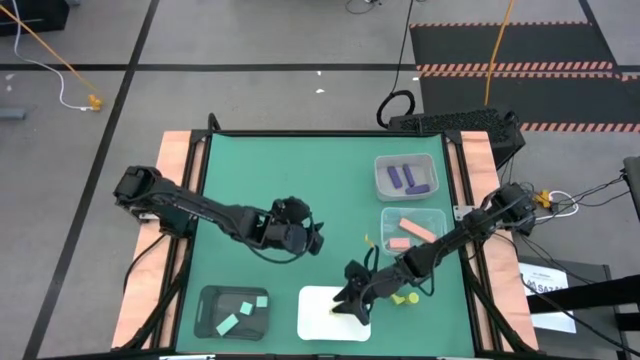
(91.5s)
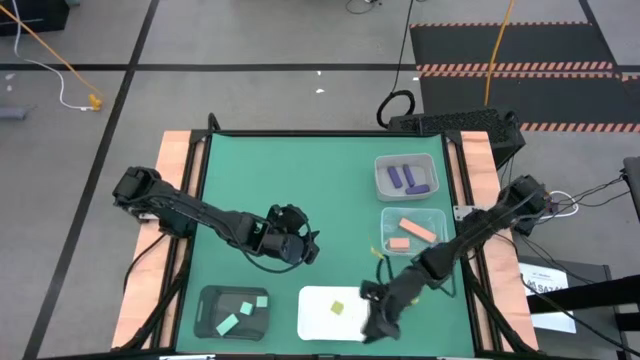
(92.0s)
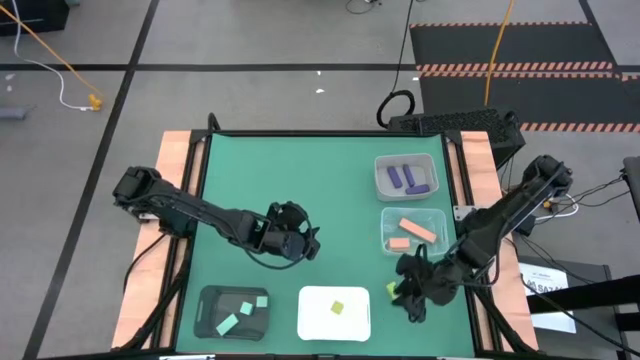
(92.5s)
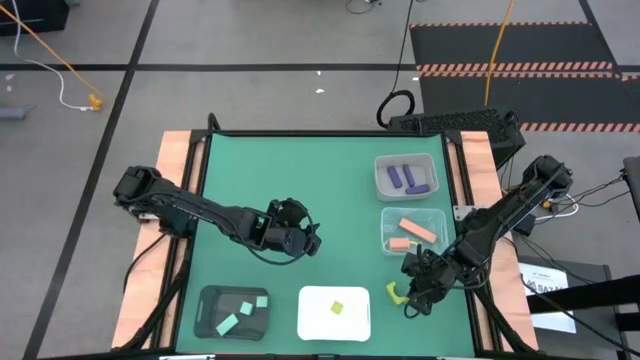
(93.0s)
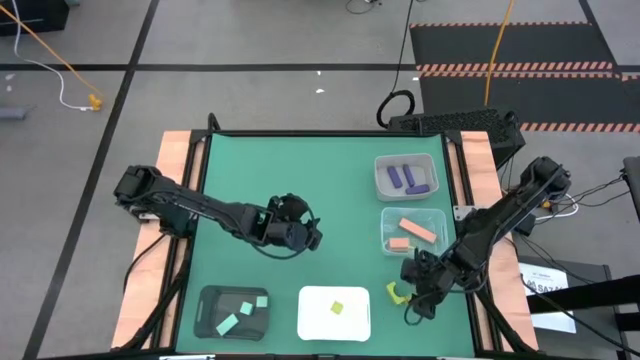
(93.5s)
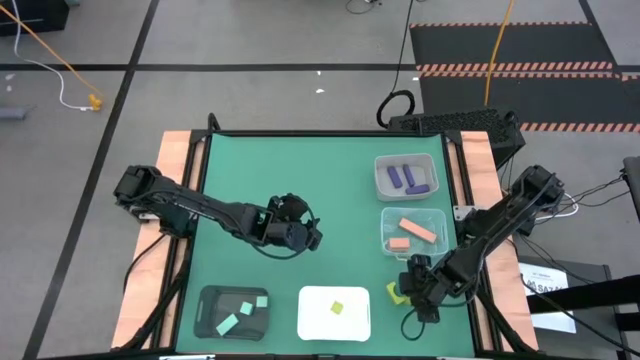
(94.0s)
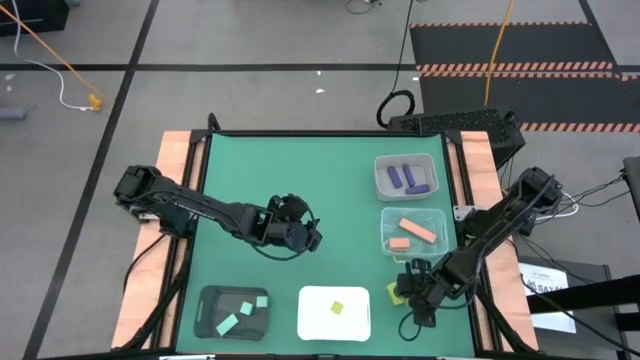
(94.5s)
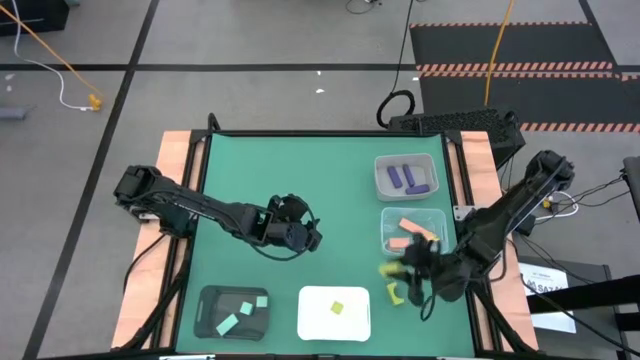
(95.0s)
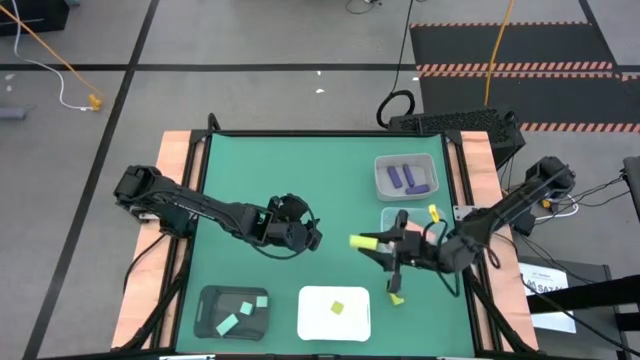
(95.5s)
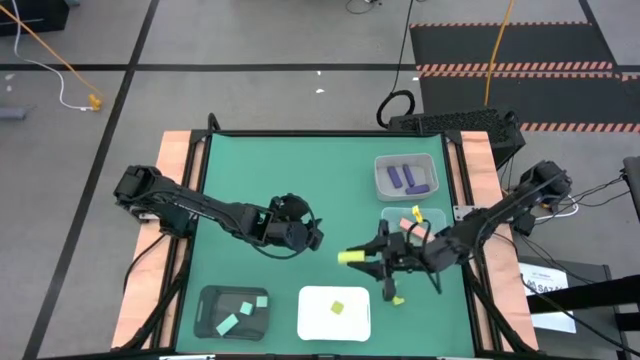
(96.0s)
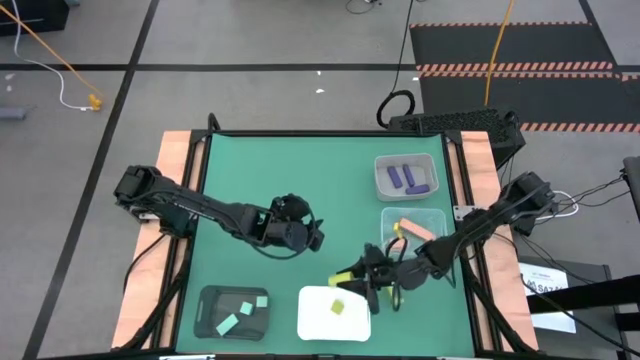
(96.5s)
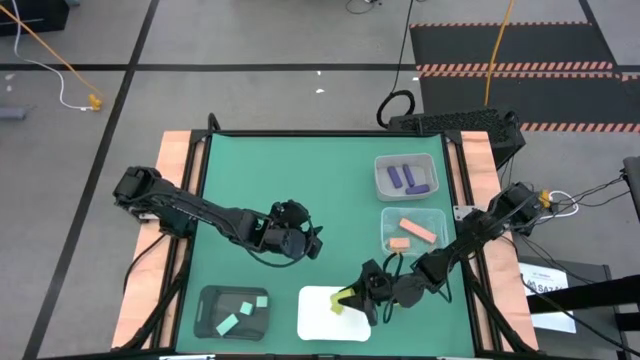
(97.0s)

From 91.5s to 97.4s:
Task: Sort & place blocks by color
Put the right green block into the white bin

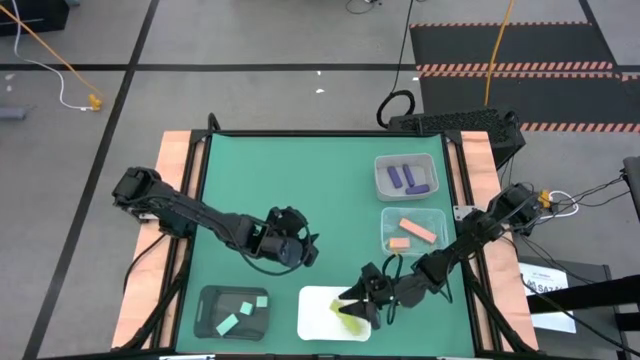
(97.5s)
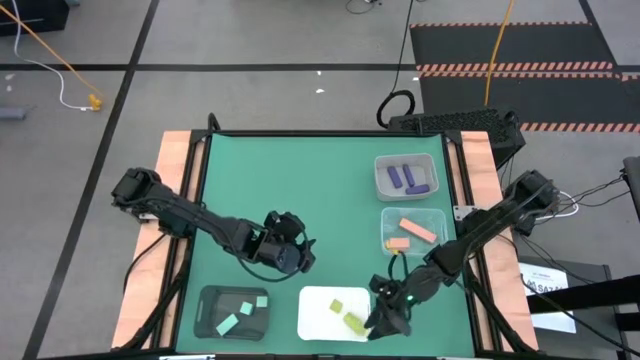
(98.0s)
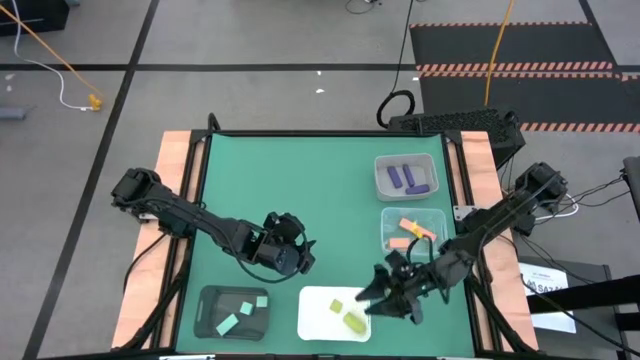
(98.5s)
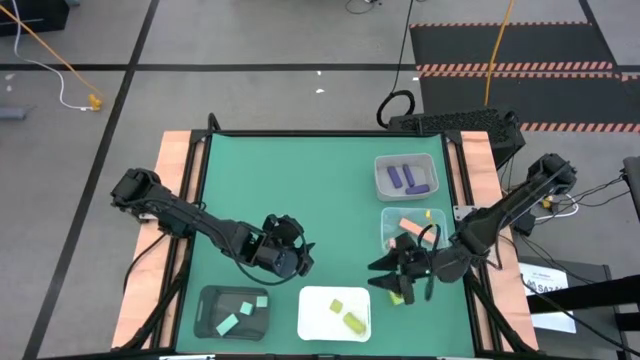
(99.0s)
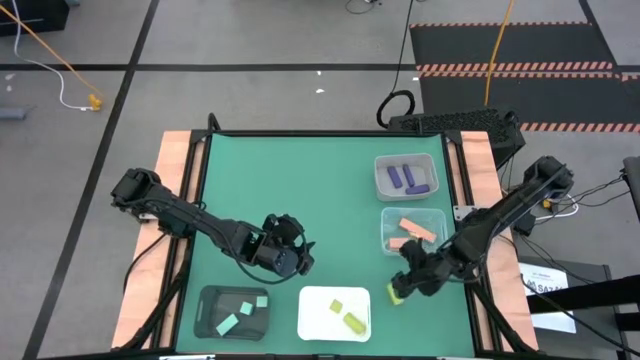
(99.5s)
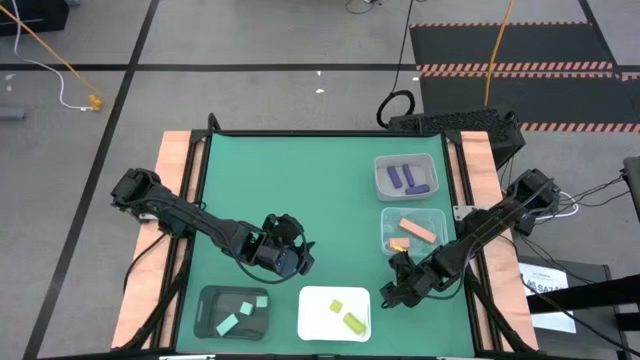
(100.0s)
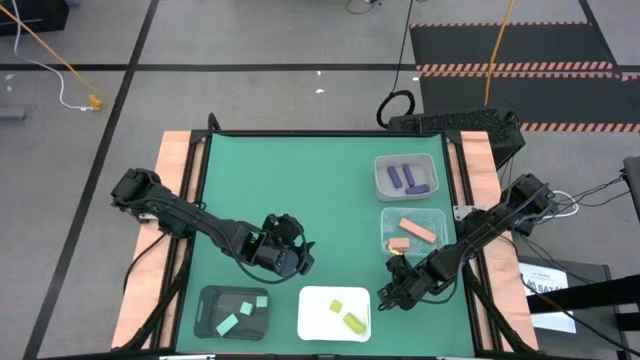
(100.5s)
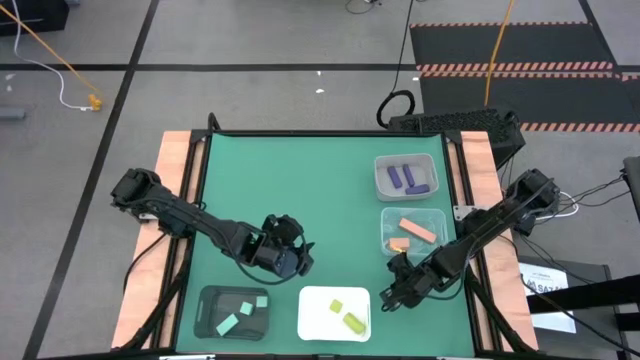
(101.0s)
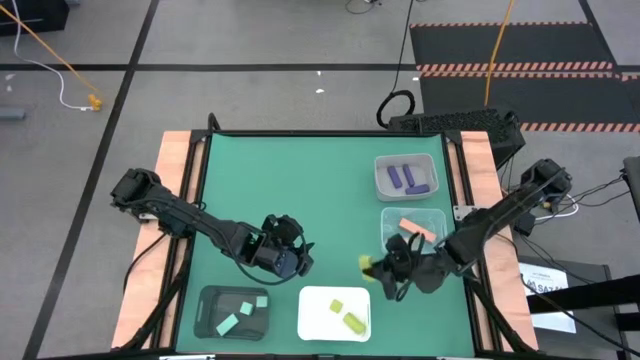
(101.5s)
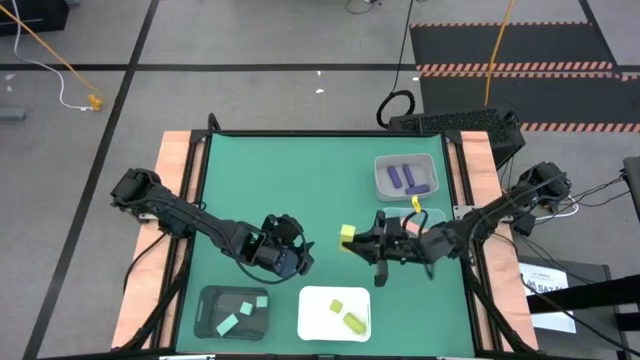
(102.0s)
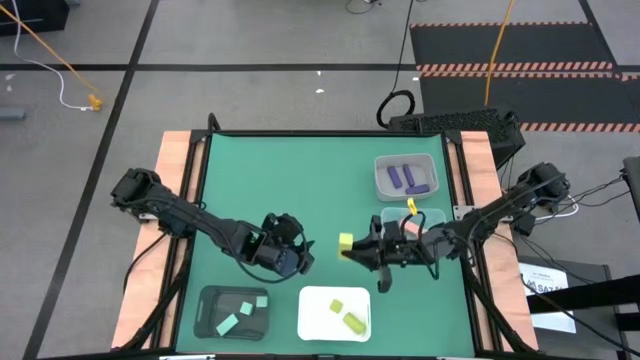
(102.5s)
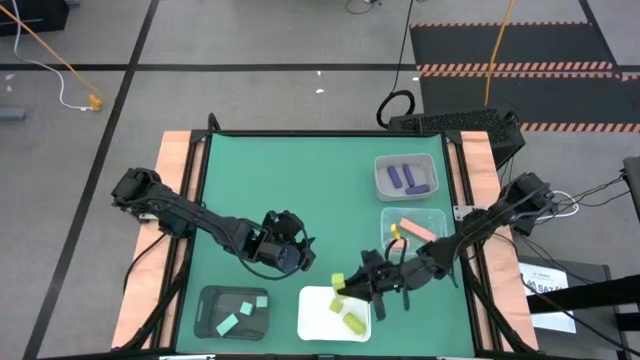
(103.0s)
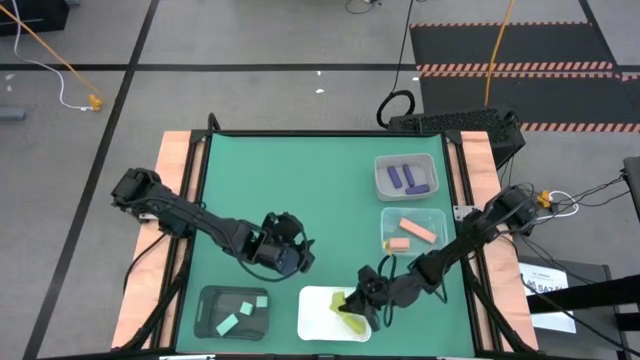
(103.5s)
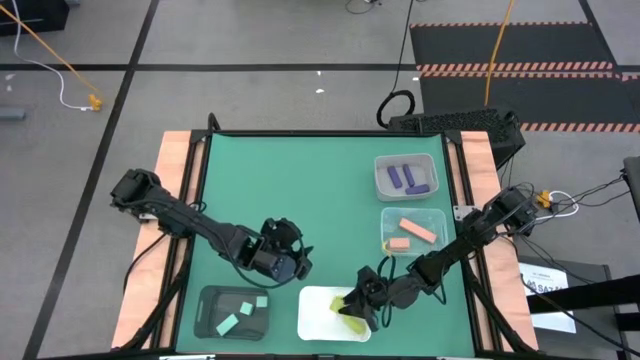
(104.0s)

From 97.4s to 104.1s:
Put the green block into the white bin

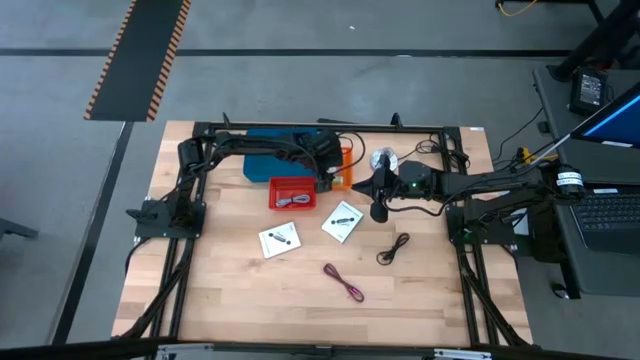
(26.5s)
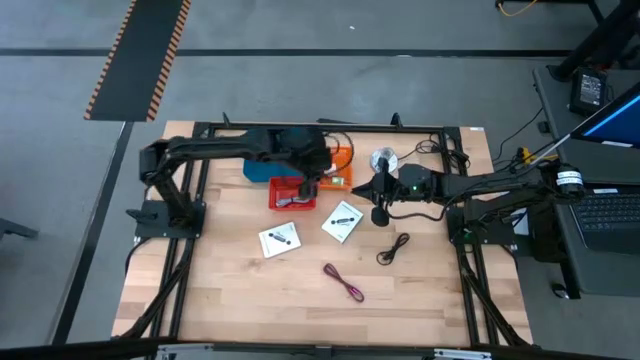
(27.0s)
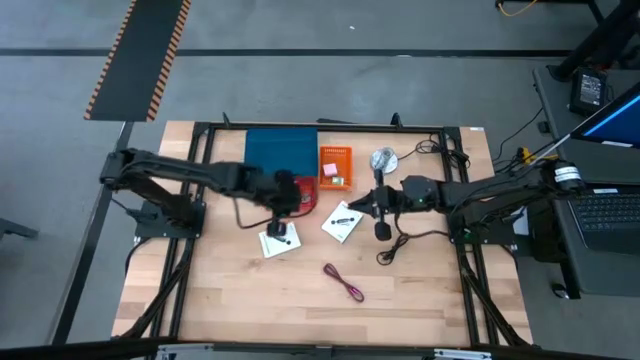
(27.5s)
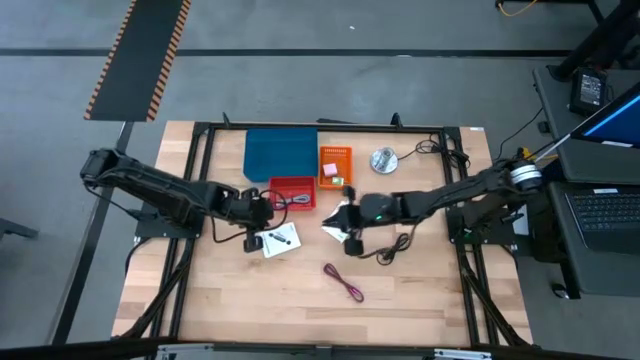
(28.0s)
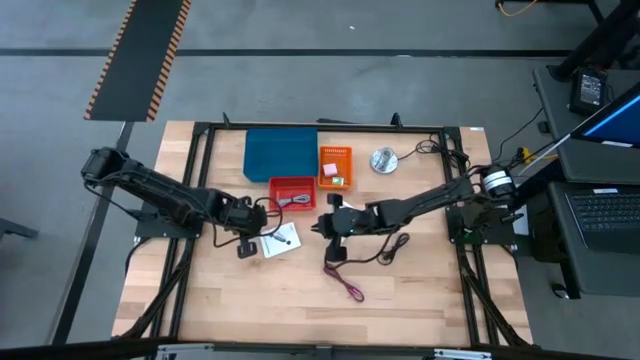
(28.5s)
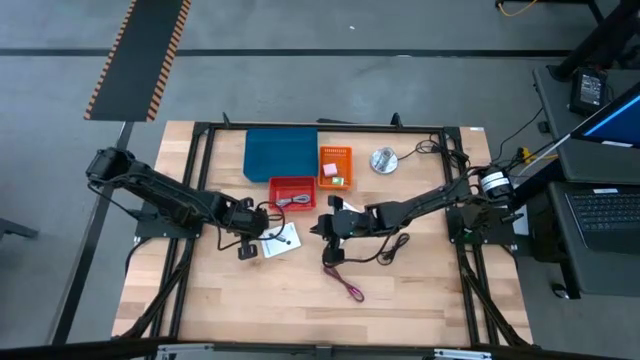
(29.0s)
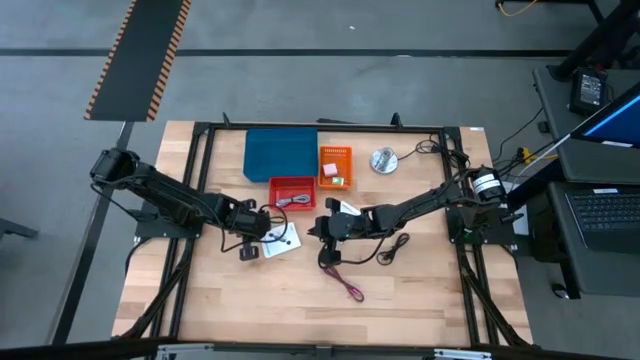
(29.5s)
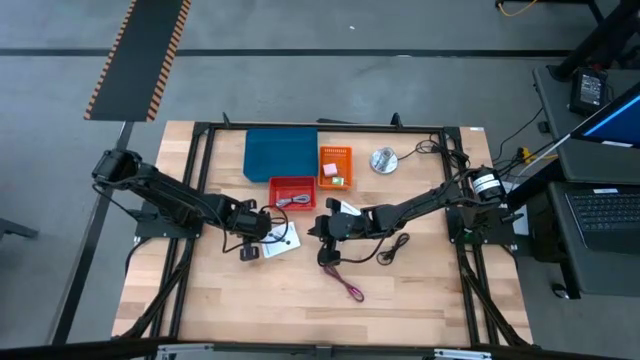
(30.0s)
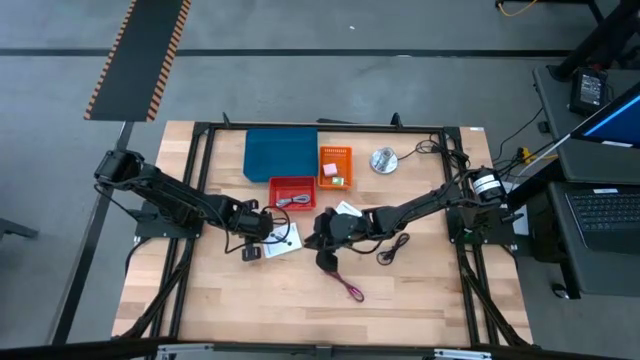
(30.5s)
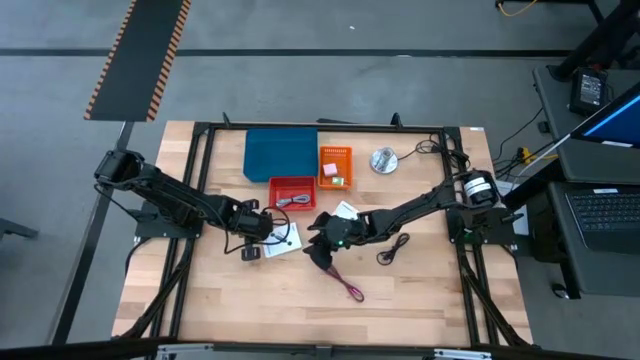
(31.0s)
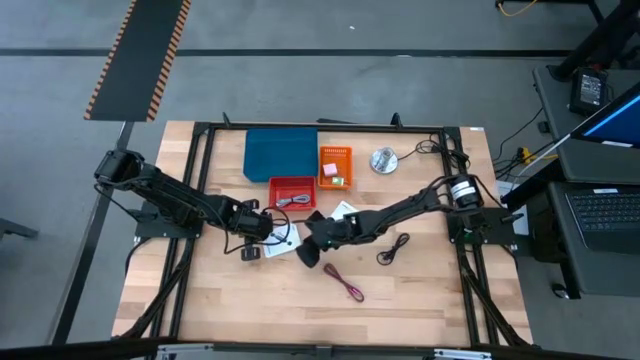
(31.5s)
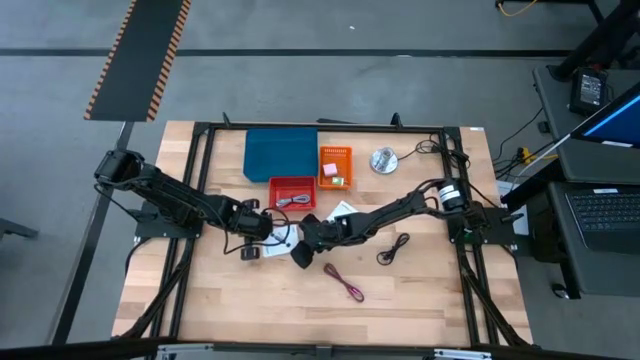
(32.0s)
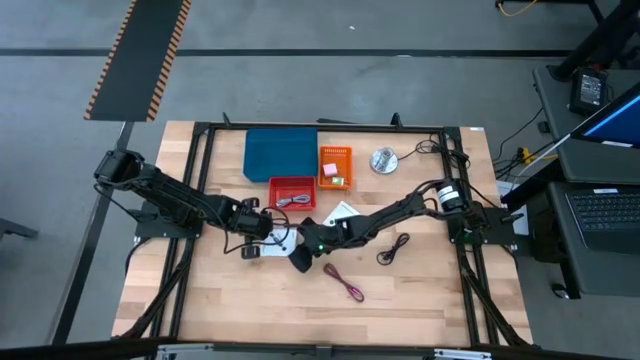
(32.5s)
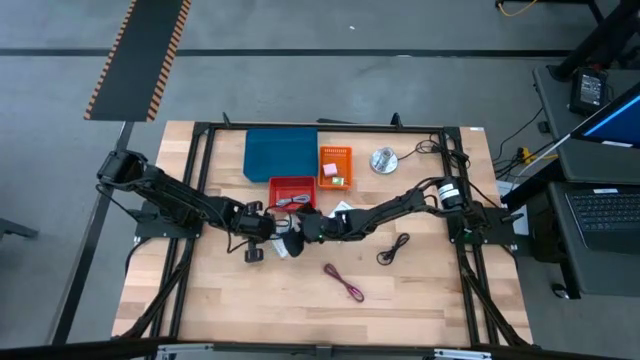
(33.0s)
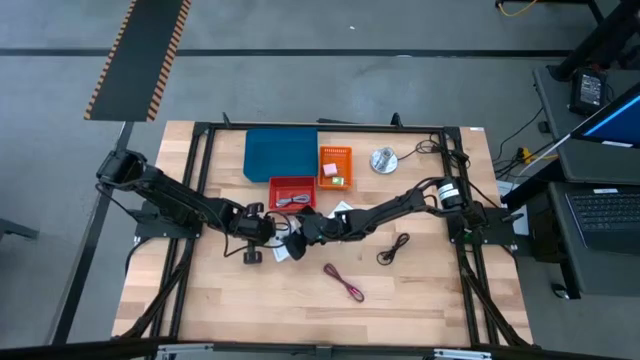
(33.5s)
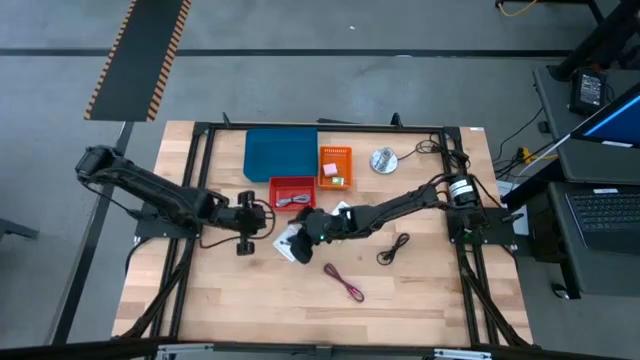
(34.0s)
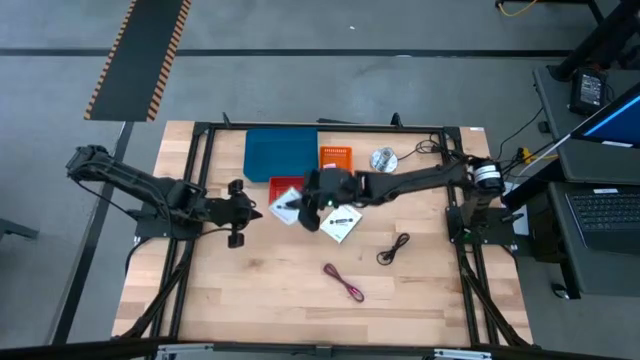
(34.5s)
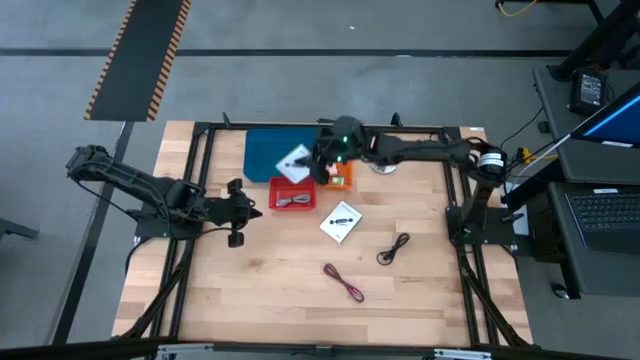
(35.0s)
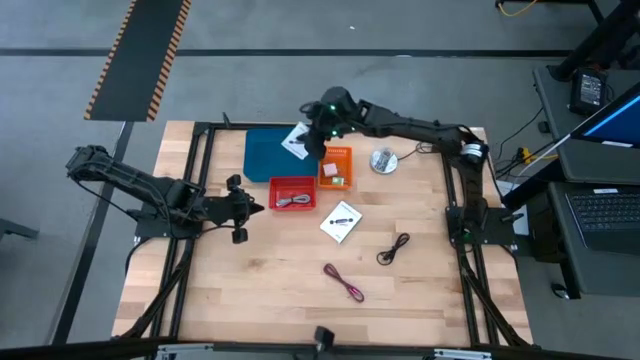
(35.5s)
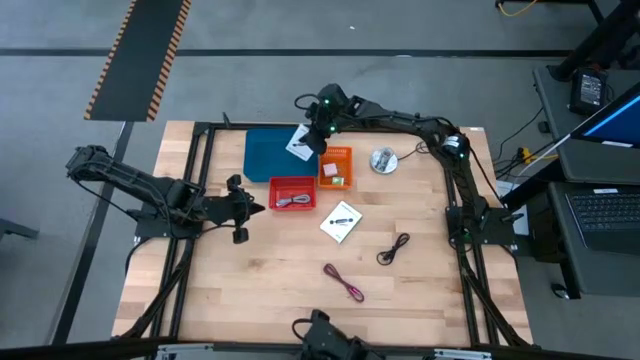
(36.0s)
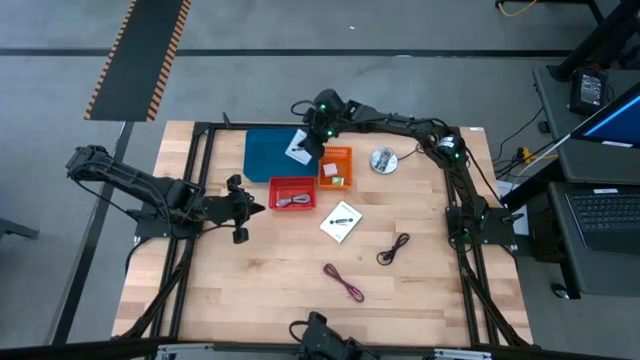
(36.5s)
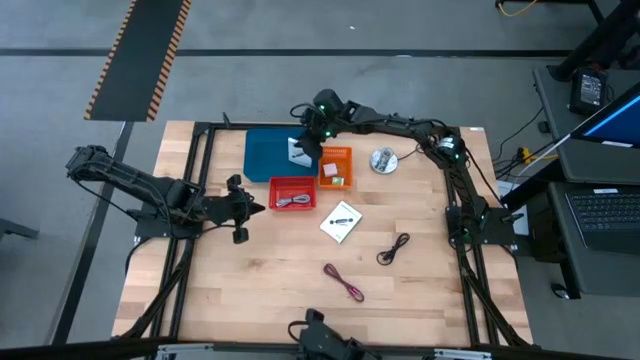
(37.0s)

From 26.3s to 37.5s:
Task: Pick and place items into bin
Put the left card reader box into the blue bin
